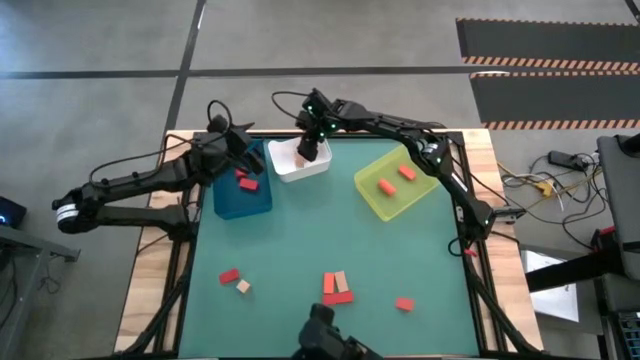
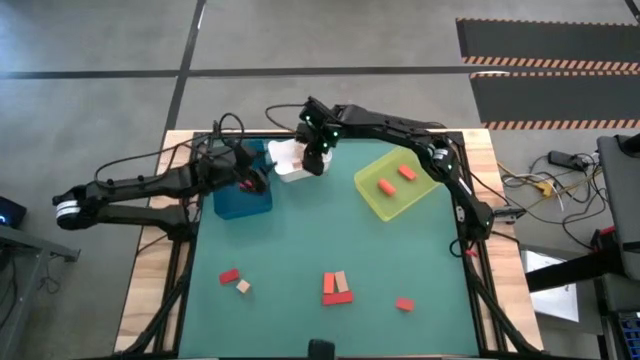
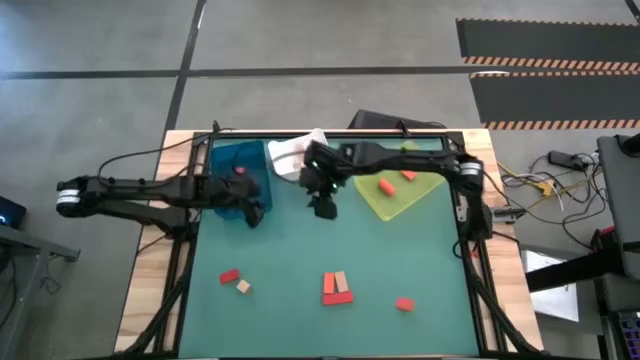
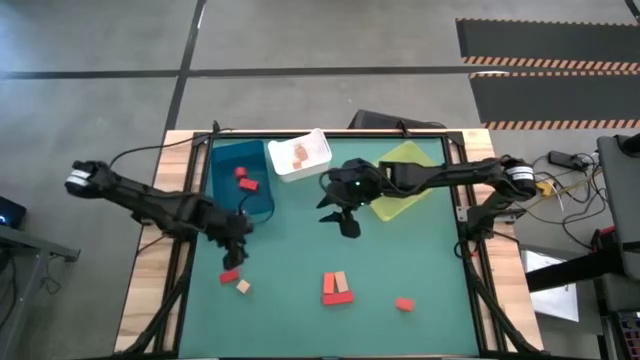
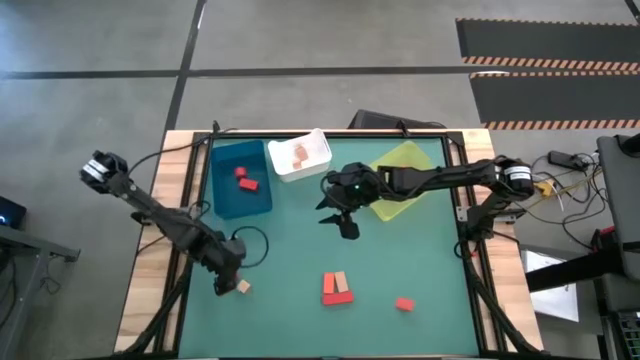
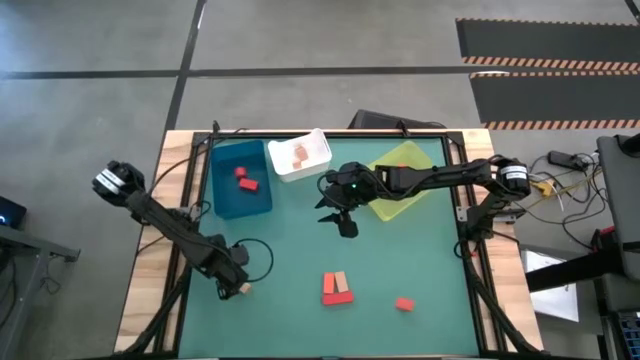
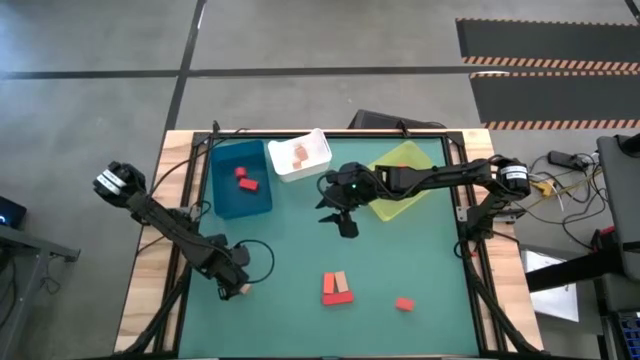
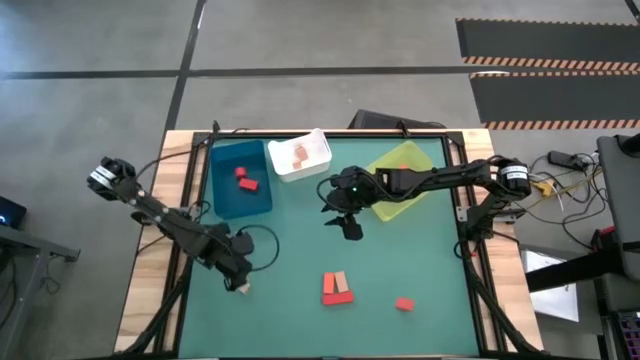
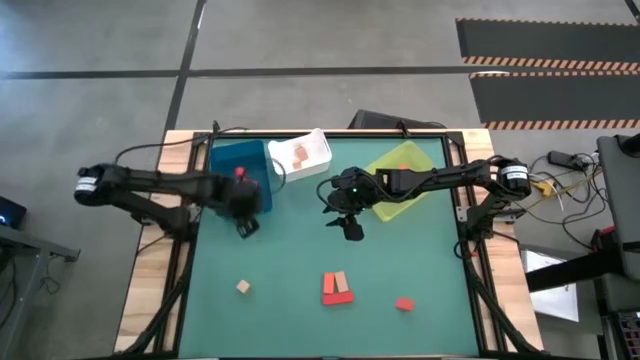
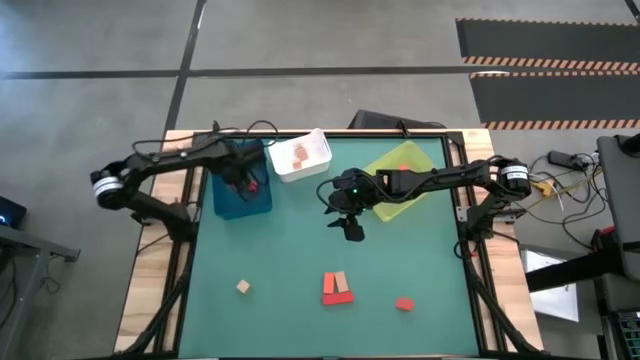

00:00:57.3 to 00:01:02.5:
Task: Sort & place blocks by color
Put the red block into the blue bin

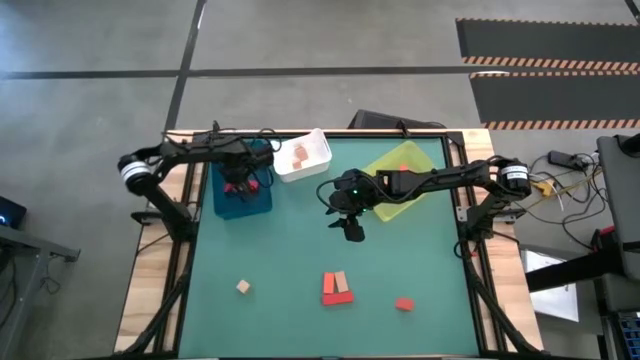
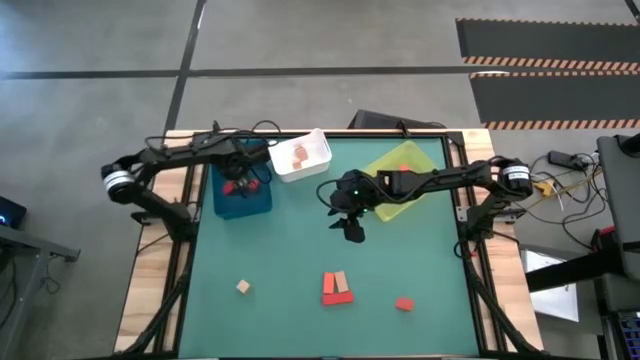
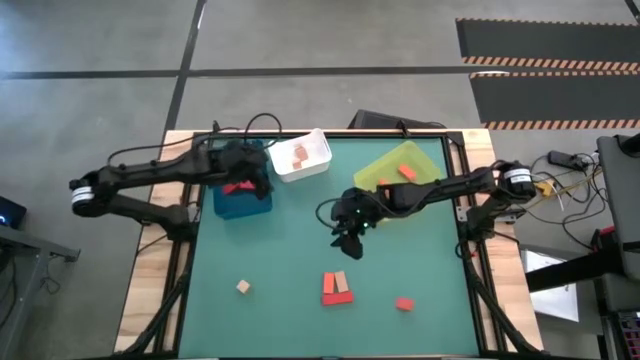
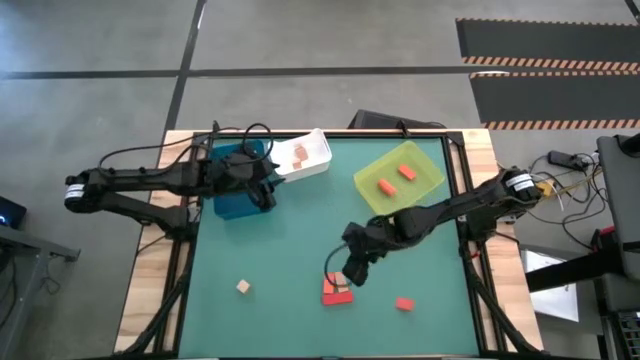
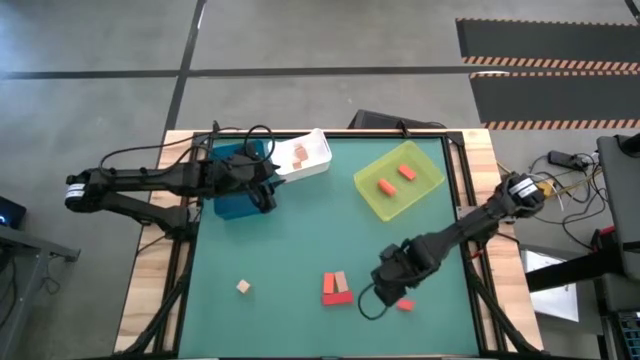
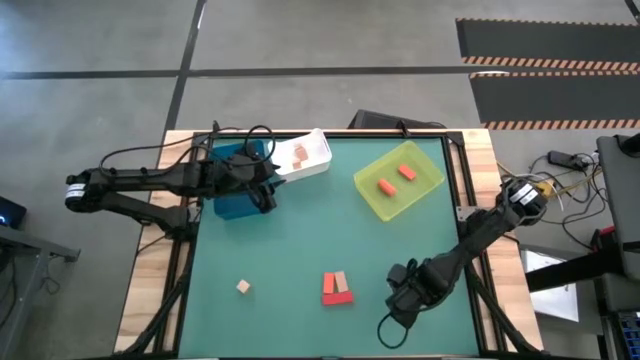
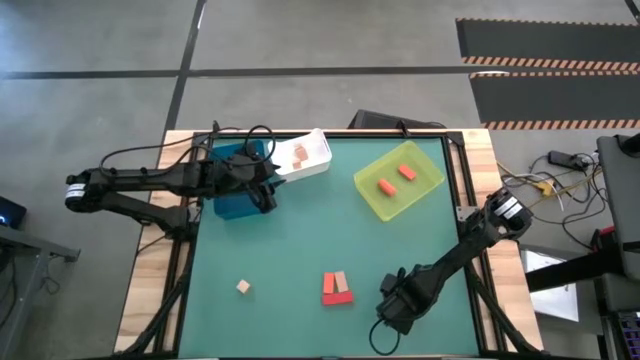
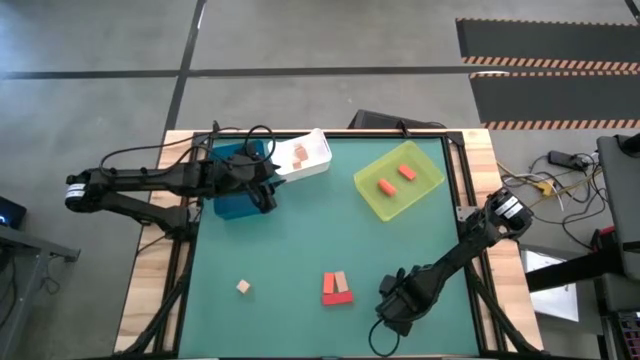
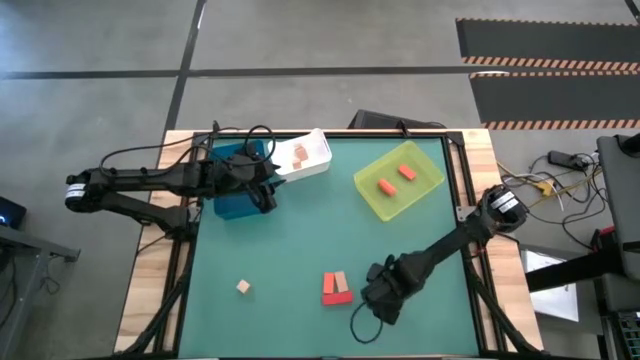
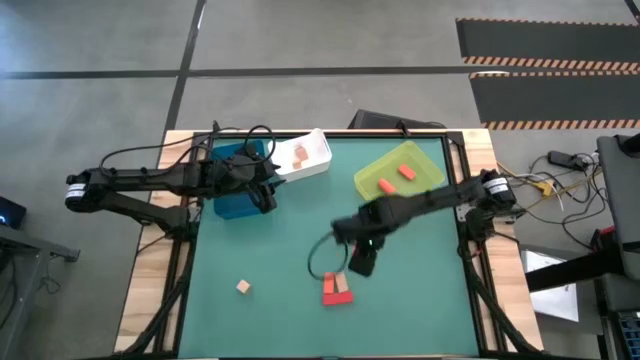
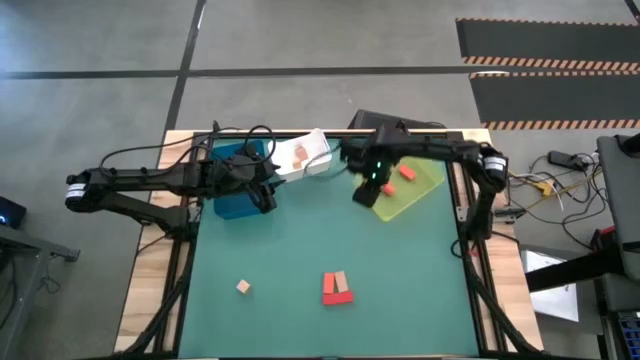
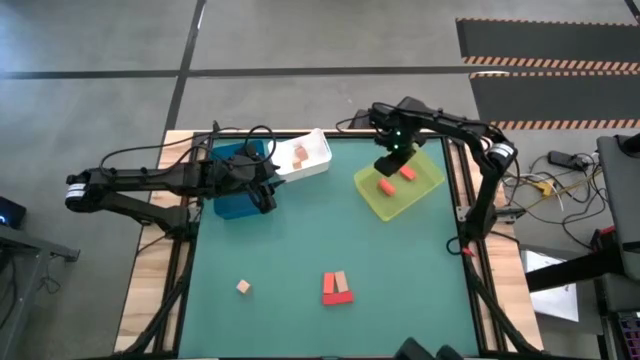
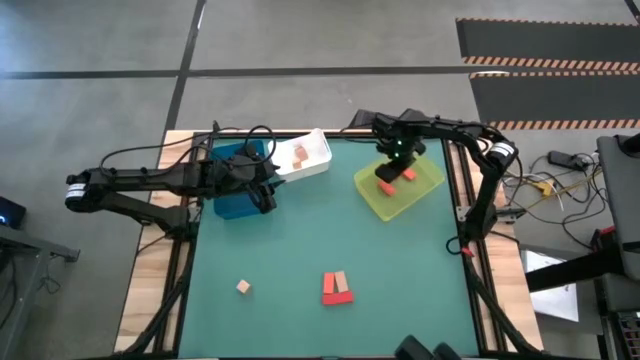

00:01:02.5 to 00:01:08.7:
Put the orange block into the yellow bin

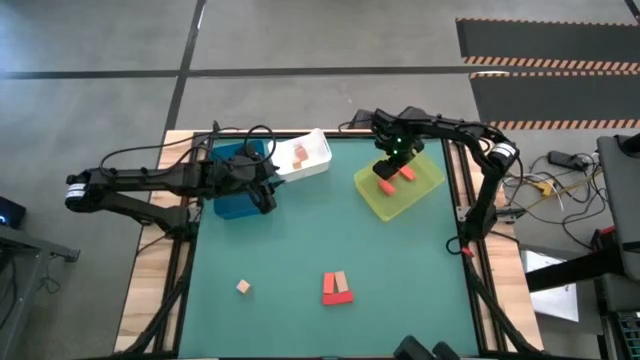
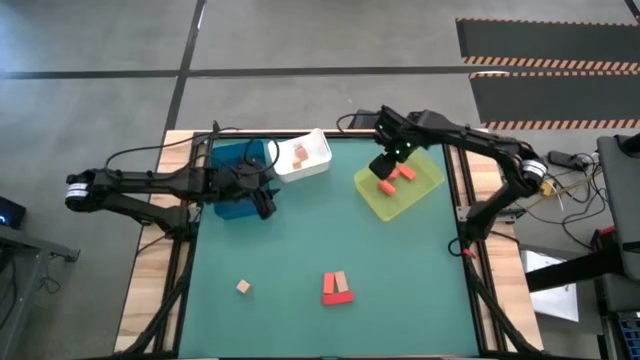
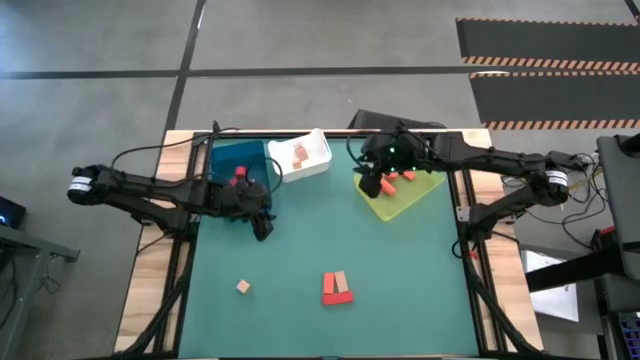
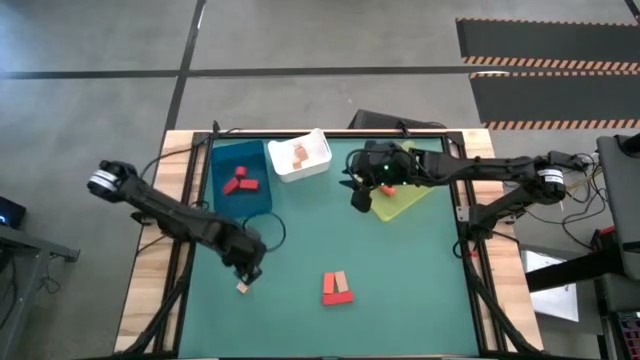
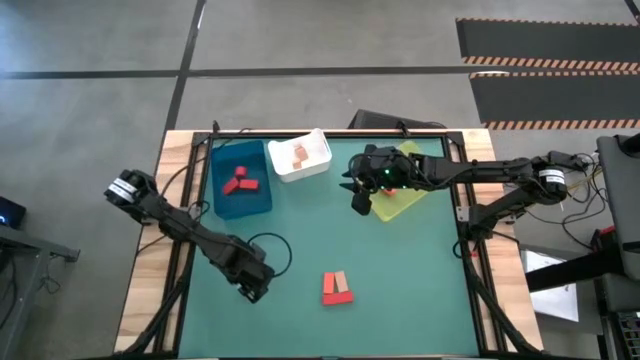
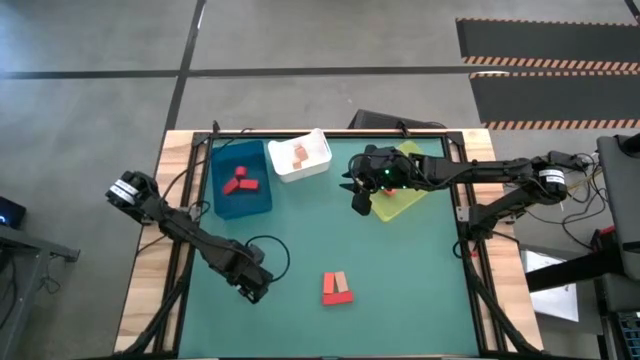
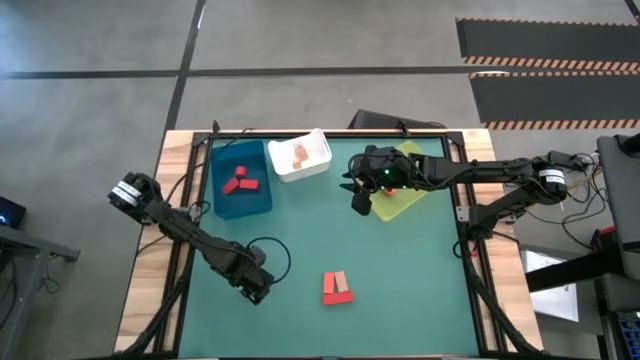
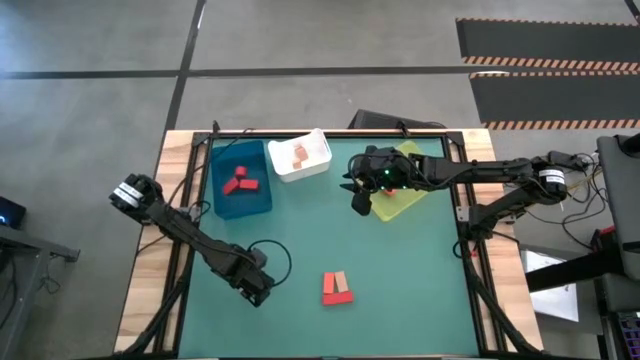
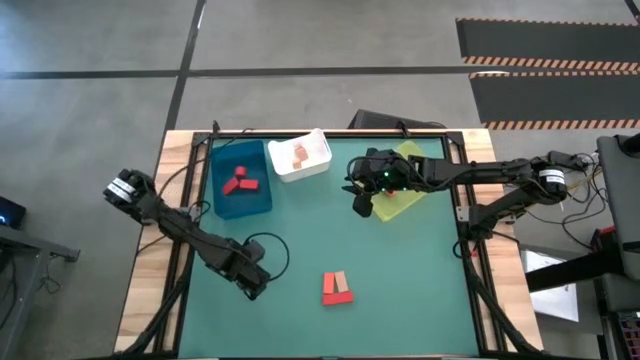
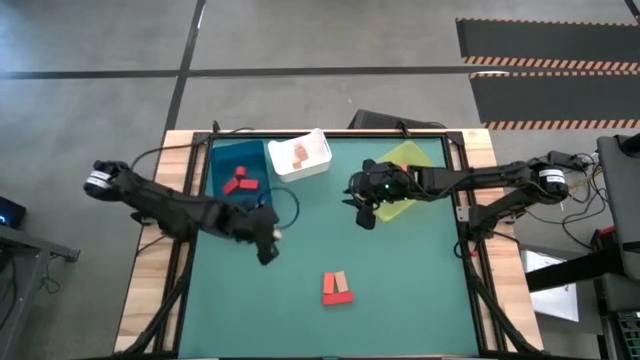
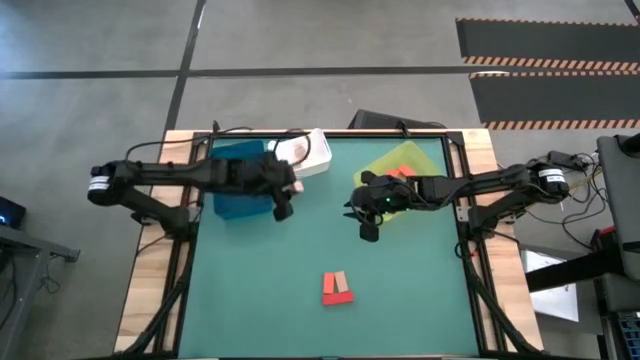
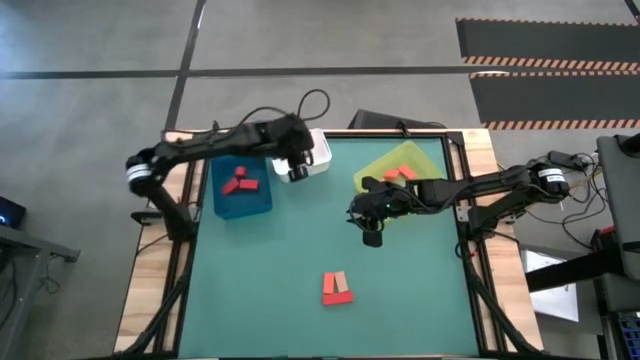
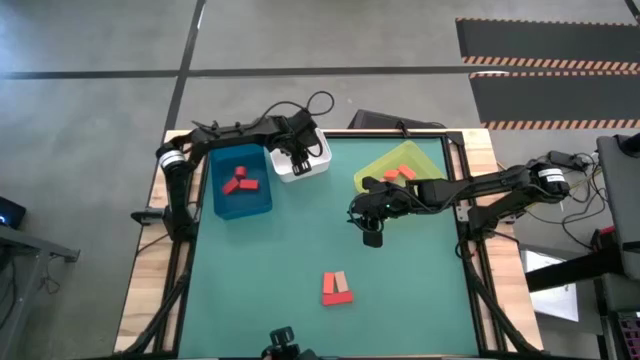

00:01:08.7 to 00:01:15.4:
Put the brown block into the white bin

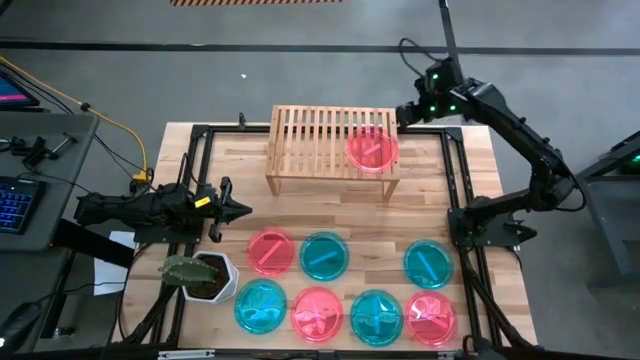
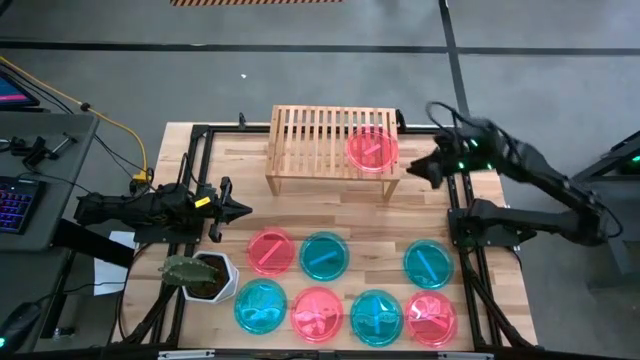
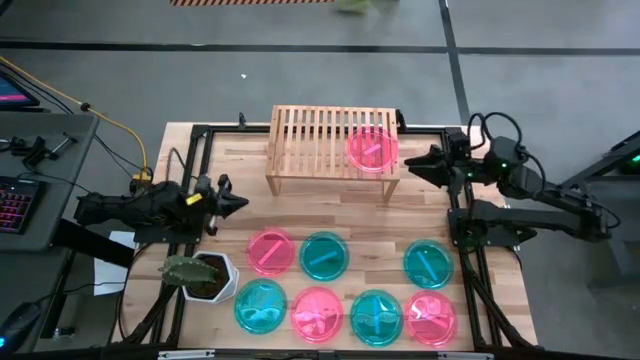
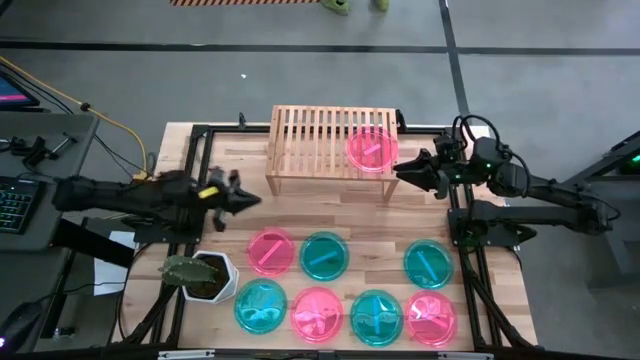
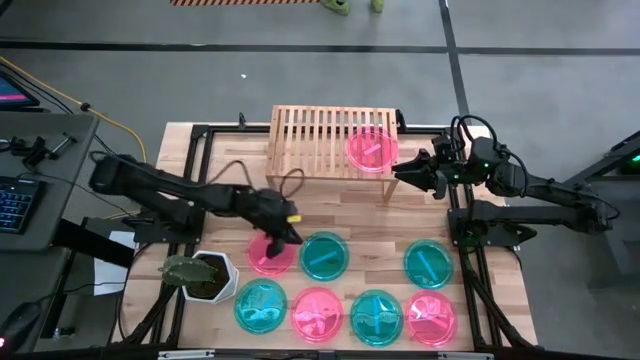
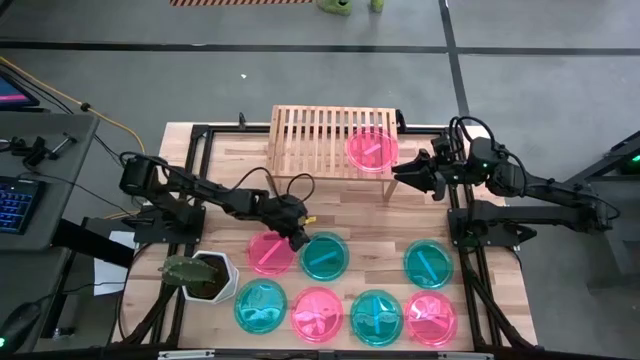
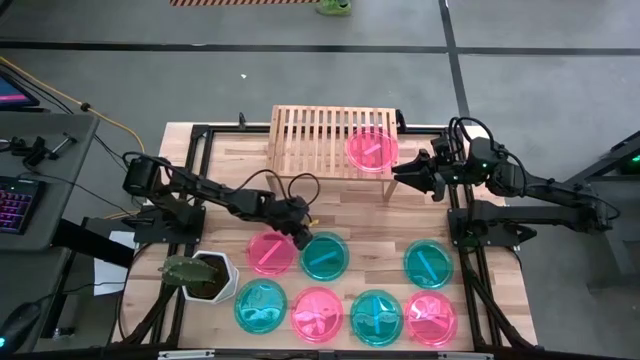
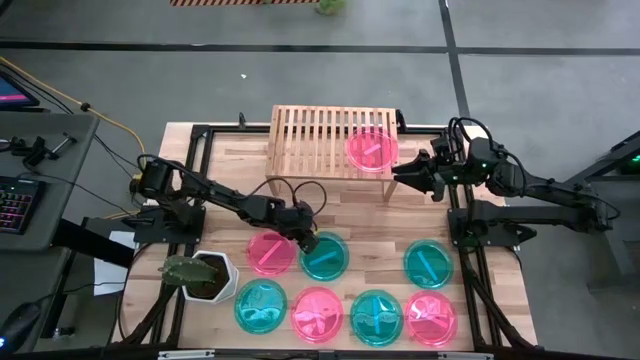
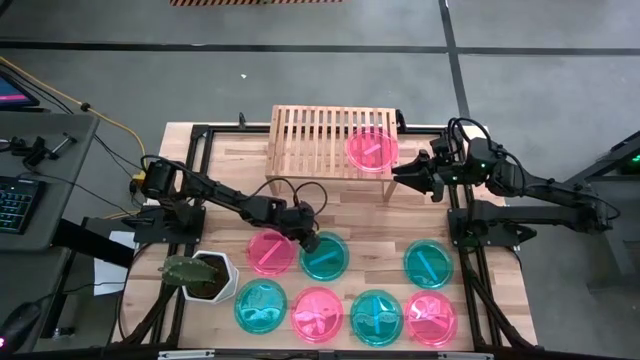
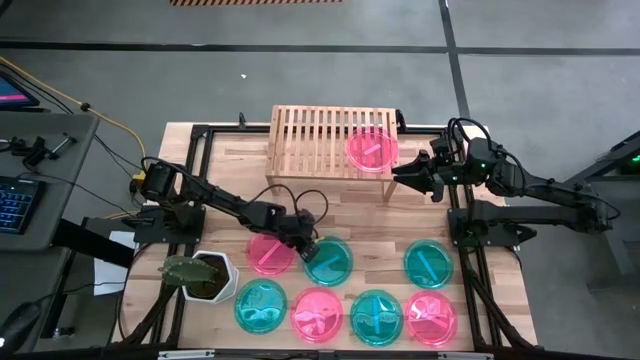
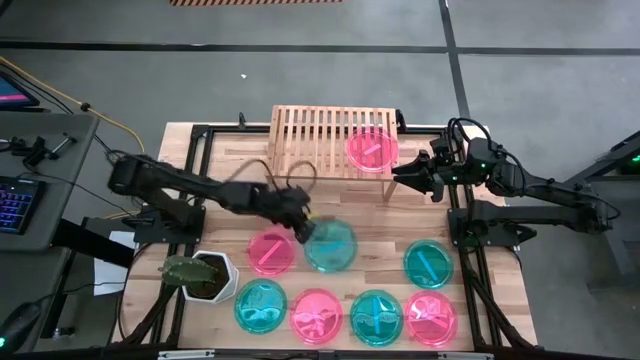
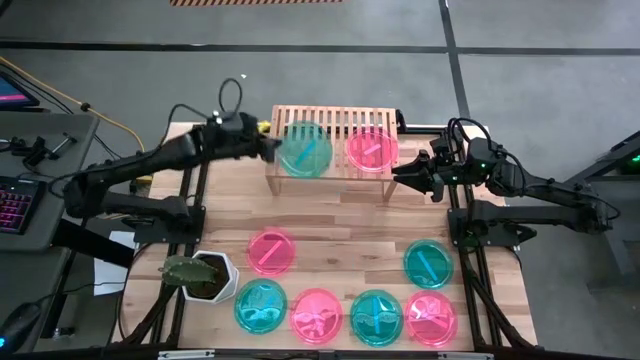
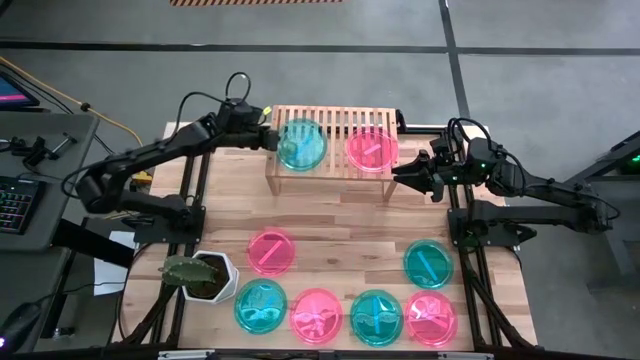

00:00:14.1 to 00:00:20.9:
Task: Place and stack plates onto a shelf
Put the top left blue plate on the shelf
